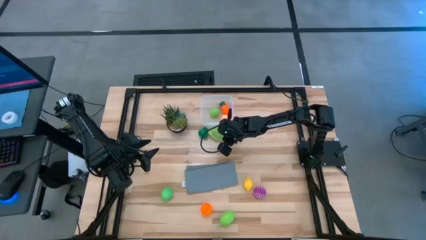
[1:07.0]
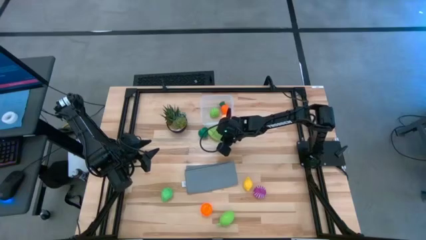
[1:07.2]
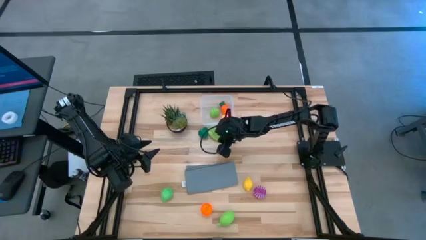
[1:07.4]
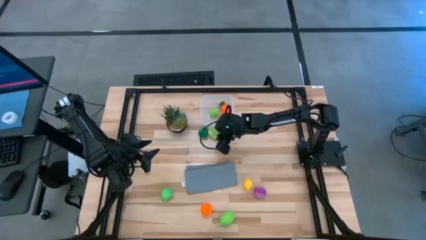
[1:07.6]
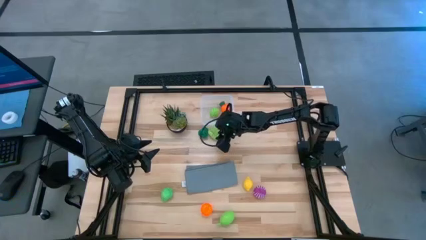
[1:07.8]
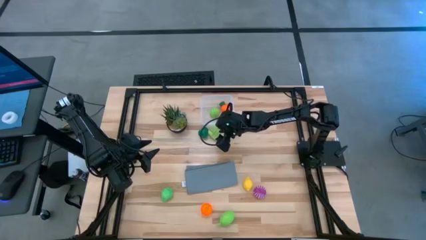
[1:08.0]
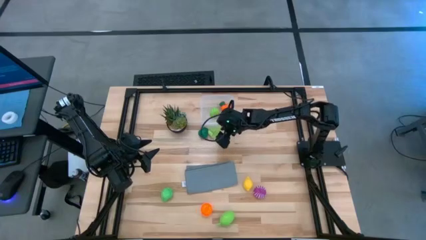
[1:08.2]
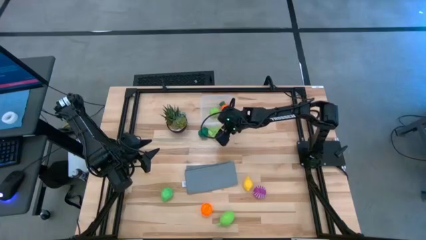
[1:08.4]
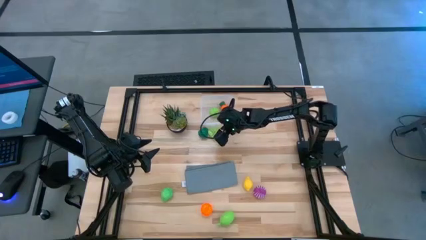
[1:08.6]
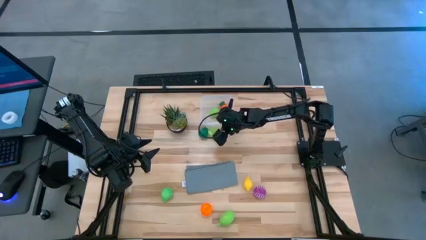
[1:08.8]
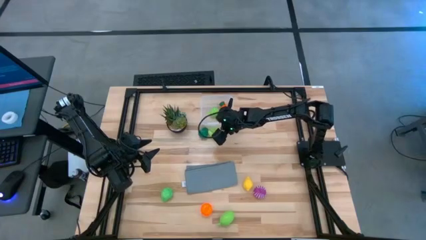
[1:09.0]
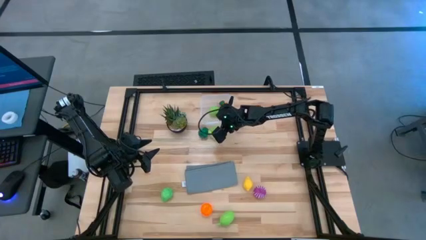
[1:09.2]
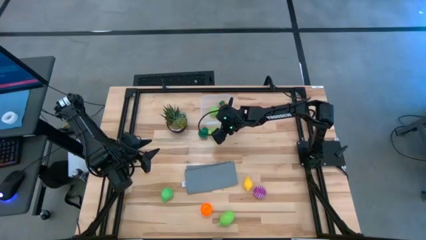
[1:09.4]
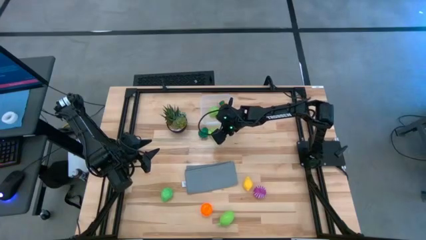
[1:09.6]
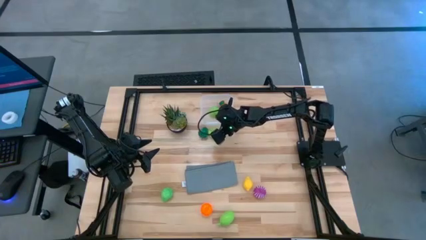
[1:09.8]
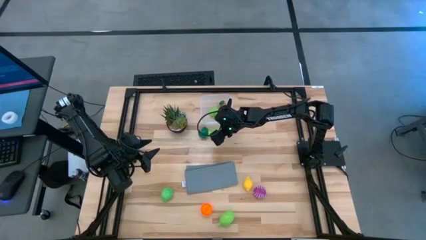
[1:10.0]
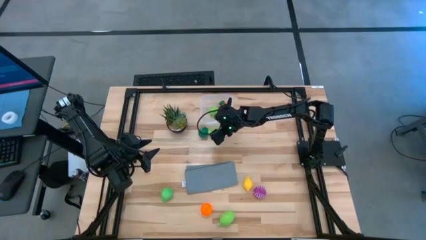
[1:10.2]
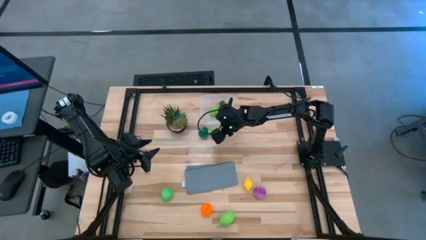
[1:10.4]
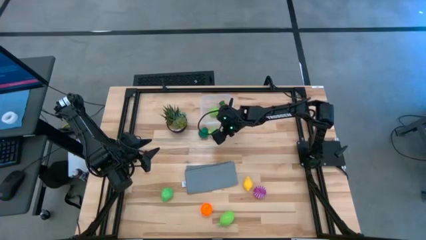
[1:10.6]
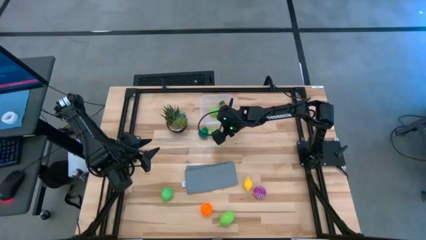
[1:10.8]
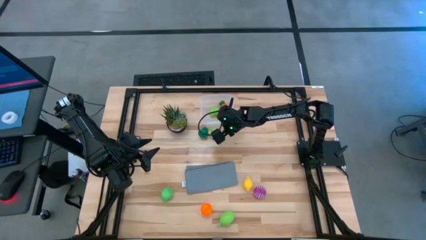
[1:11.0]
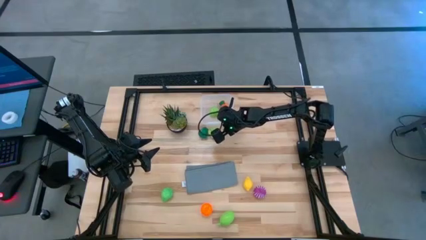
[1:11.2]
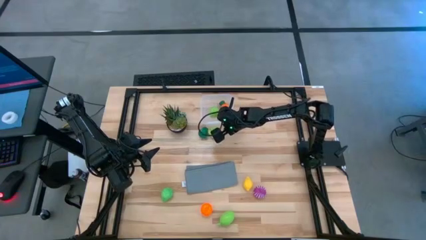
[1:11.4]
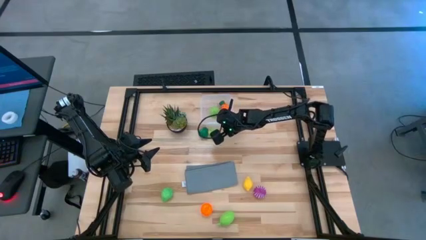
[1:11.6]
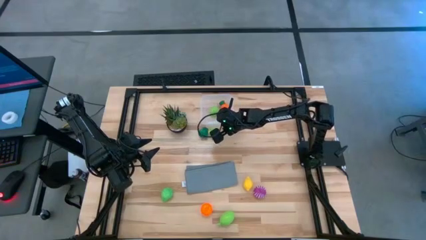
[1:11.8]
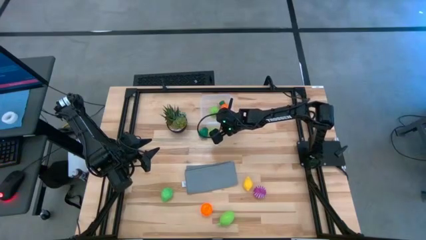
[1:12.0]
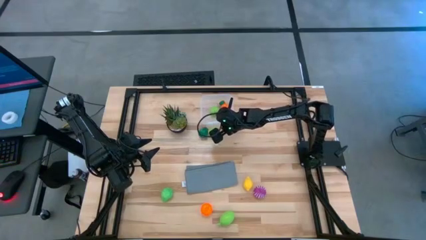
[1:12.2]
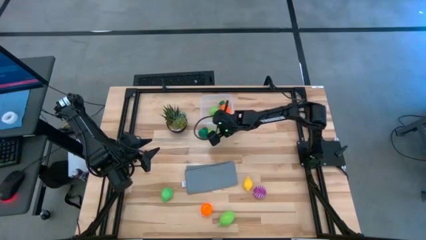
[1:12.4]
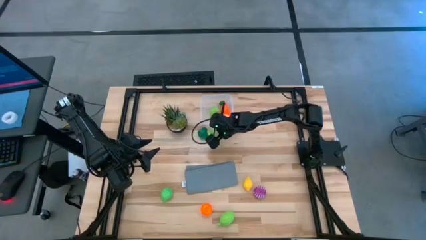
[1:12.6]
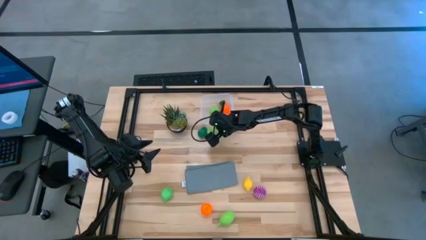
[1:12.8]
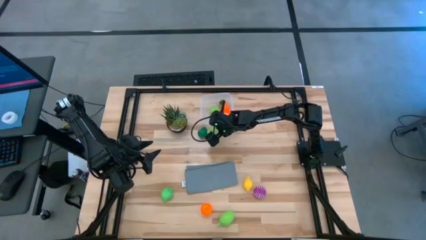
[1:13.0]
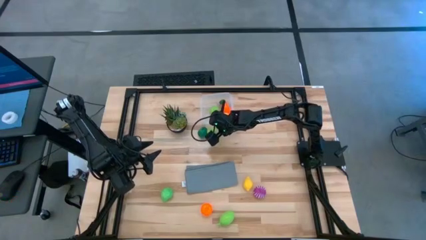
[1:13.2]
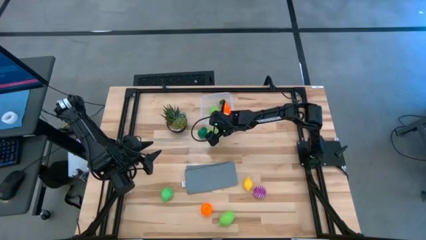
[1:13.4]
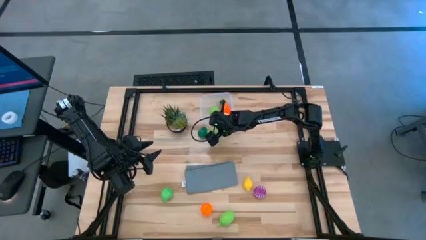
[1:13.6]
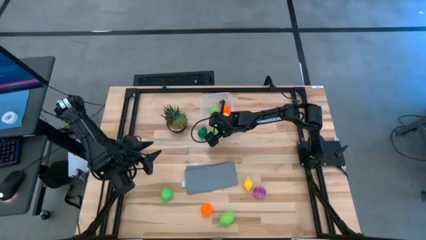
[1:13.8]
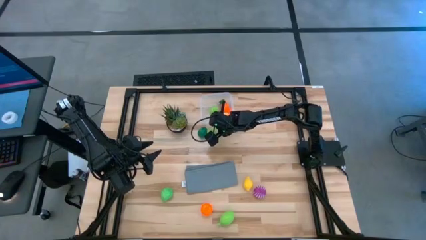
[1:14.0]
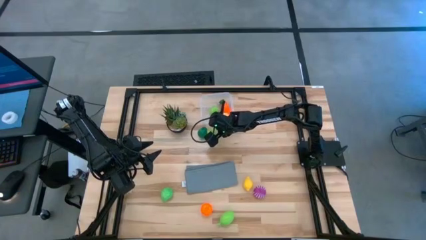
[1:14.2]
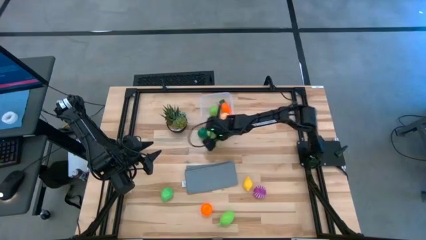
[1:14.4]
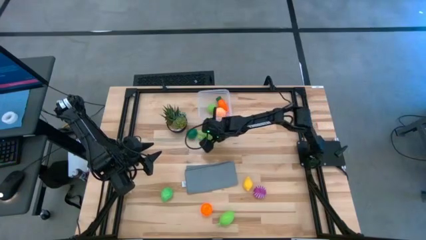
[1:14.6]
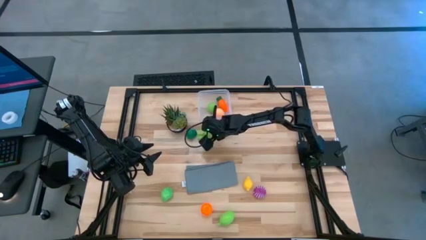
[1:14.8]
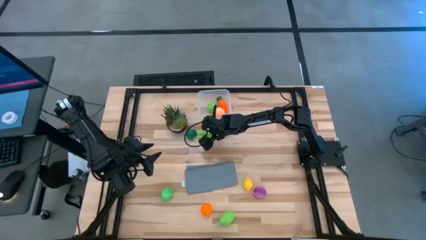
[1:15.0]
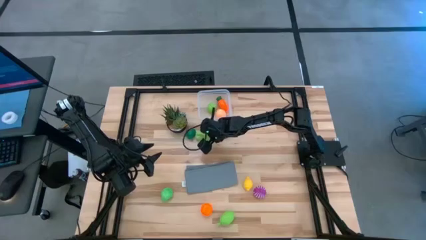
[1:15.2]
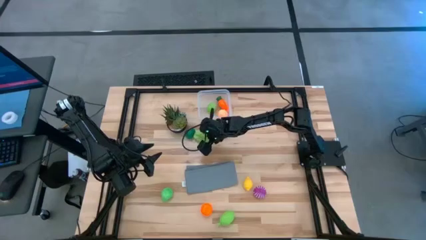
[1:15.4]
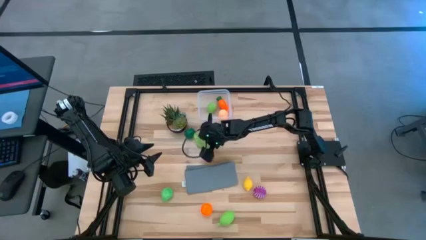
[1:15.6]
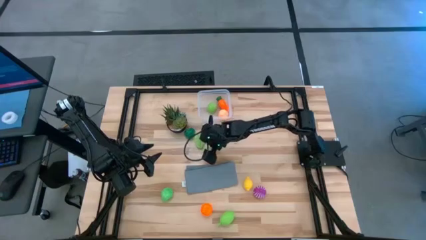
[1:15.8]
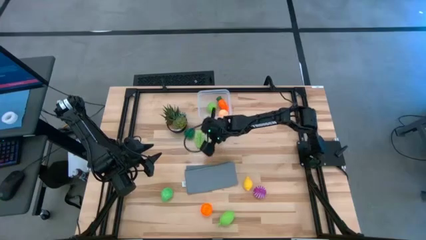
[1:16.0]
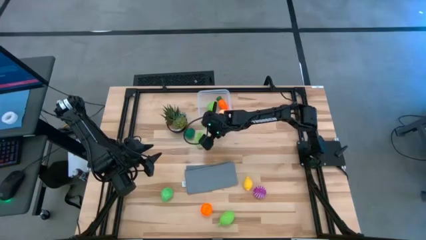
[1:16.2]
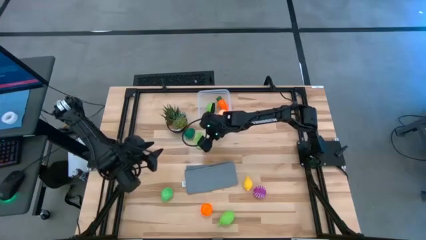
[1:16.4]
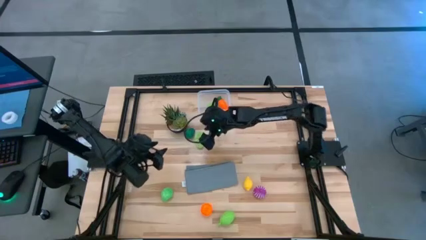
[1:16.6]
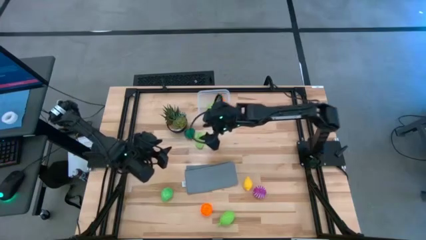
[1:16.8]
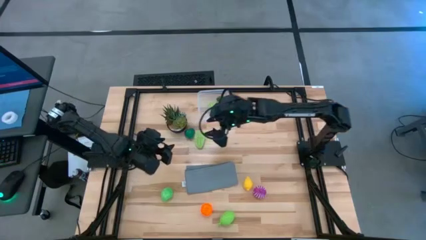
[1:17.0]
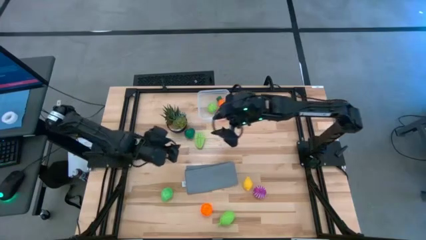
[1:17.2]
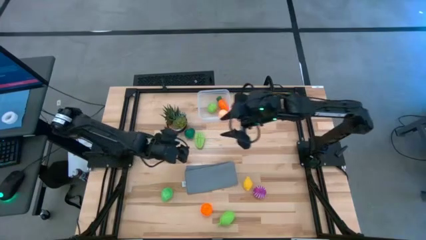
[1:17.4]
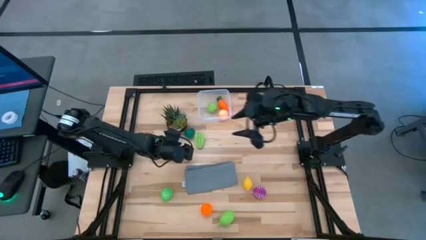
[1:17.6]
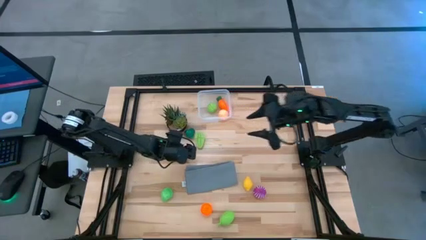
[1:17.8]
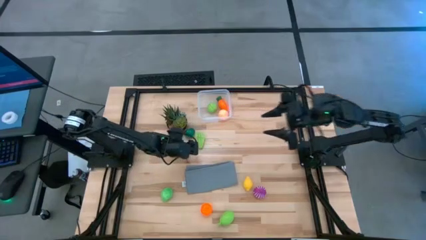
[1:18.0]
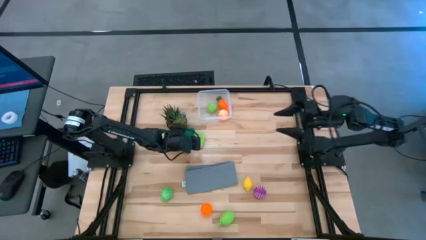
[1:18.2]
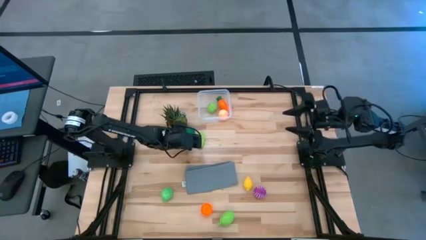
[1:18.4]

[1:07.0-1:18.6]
Task: Pick and placing Produce into tupperware
Put the starfruit into the bin

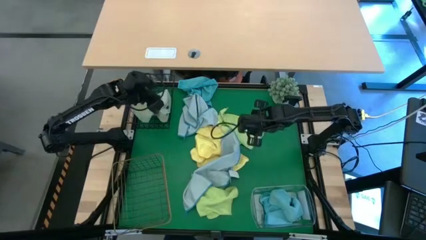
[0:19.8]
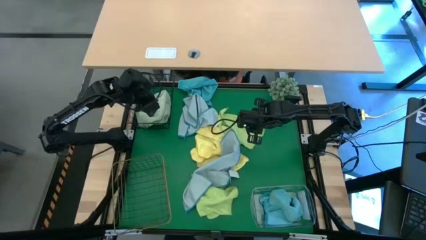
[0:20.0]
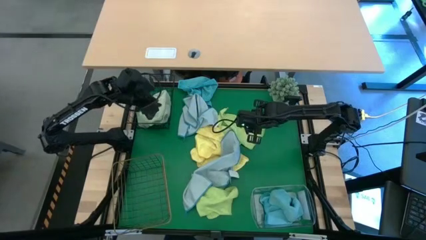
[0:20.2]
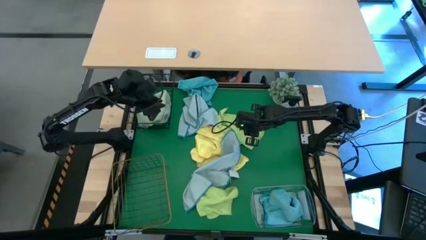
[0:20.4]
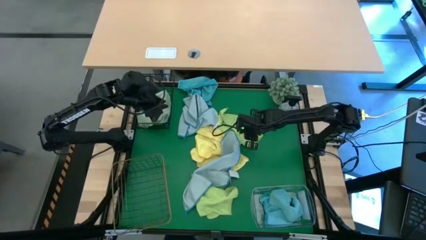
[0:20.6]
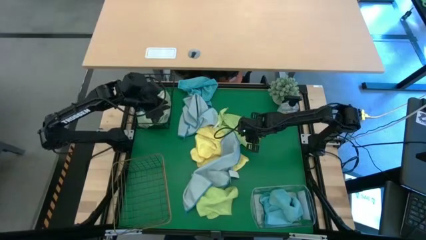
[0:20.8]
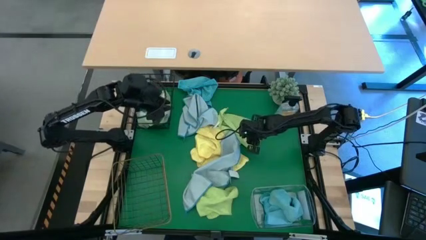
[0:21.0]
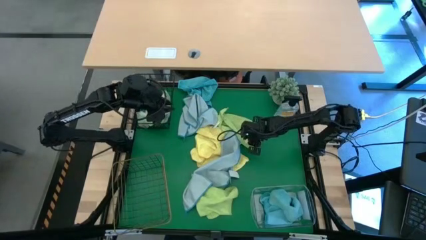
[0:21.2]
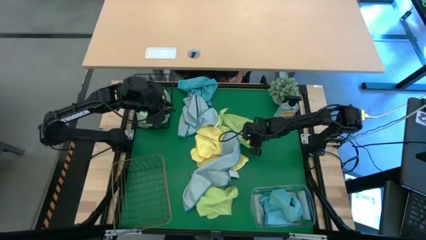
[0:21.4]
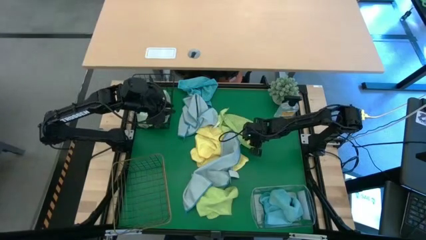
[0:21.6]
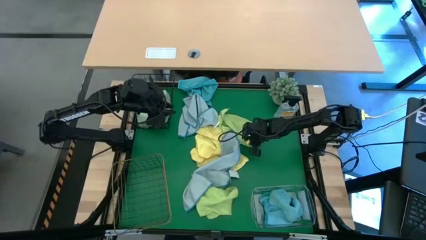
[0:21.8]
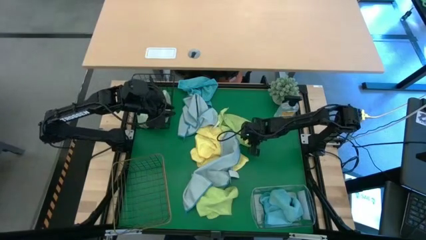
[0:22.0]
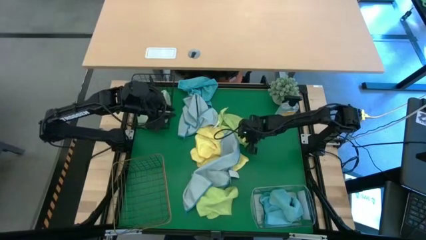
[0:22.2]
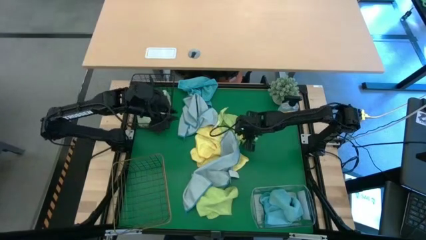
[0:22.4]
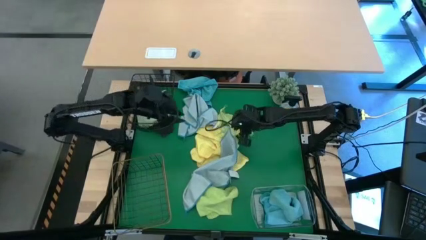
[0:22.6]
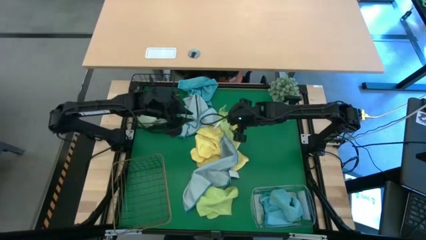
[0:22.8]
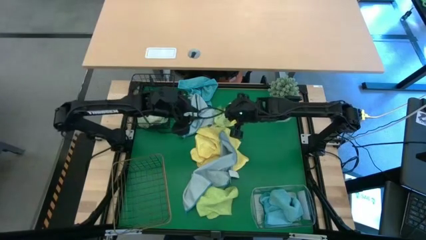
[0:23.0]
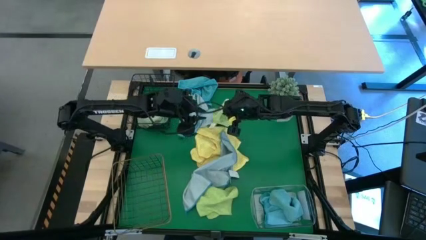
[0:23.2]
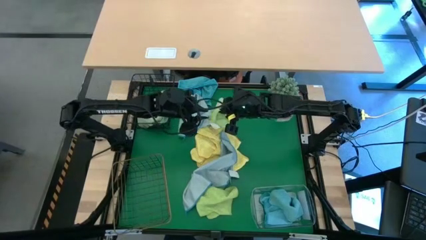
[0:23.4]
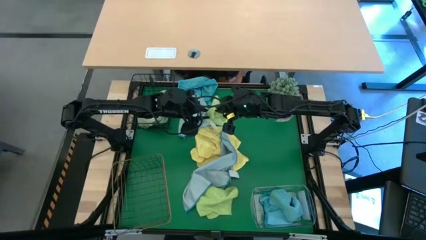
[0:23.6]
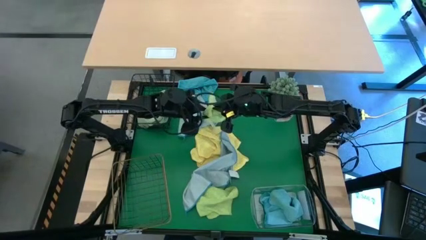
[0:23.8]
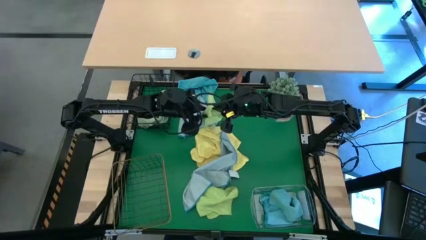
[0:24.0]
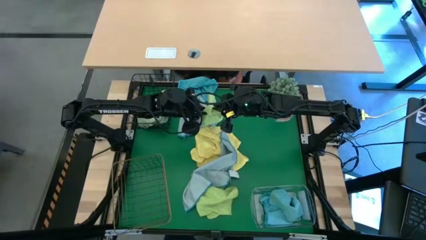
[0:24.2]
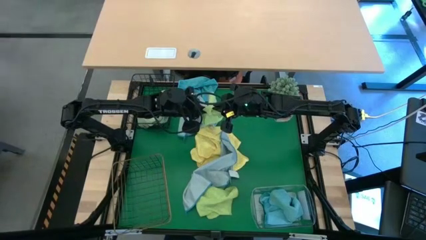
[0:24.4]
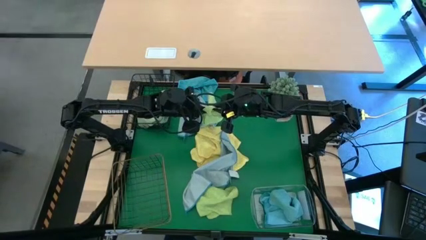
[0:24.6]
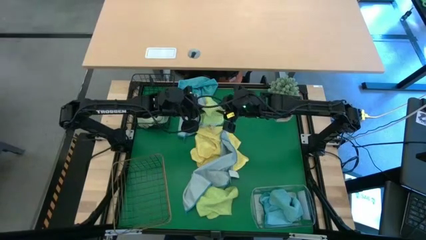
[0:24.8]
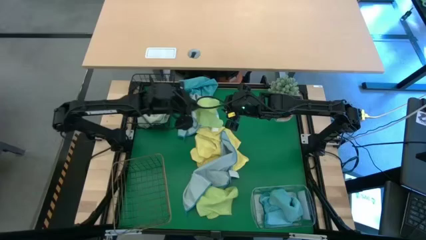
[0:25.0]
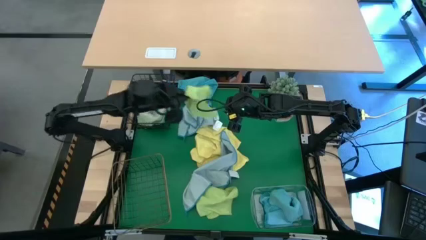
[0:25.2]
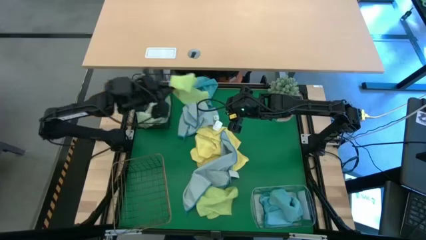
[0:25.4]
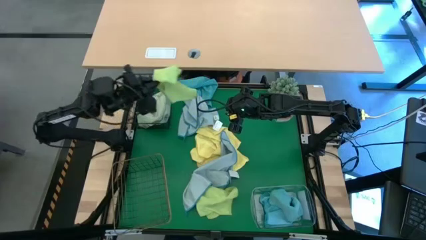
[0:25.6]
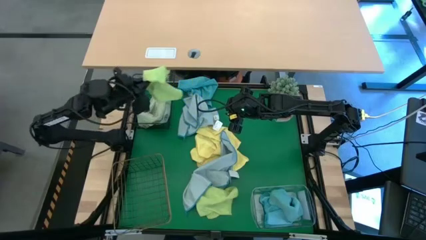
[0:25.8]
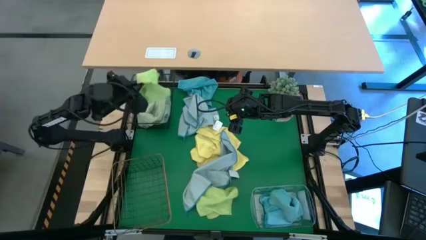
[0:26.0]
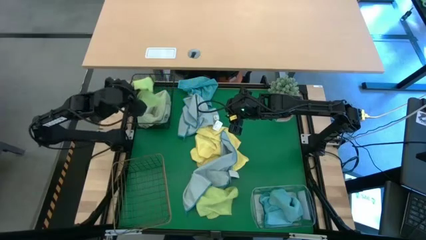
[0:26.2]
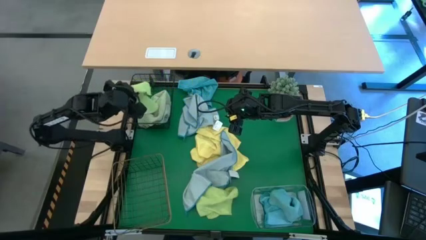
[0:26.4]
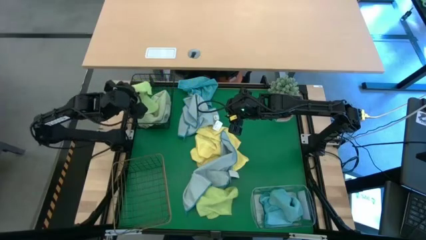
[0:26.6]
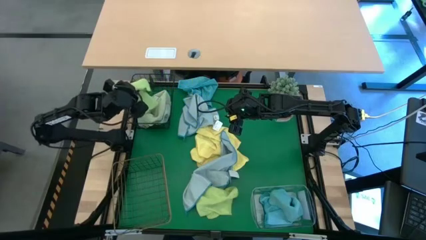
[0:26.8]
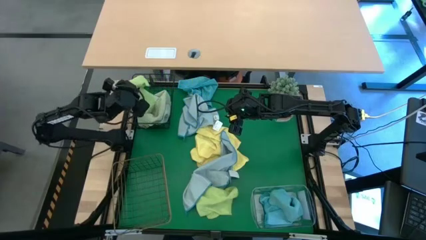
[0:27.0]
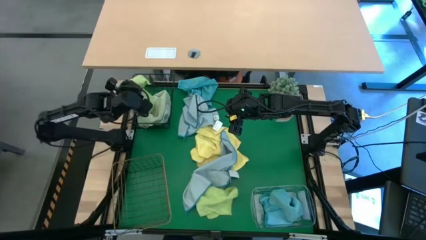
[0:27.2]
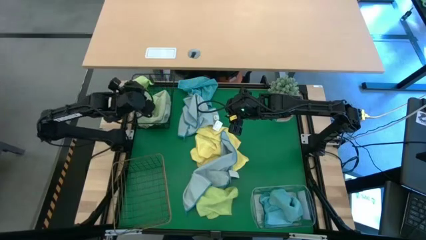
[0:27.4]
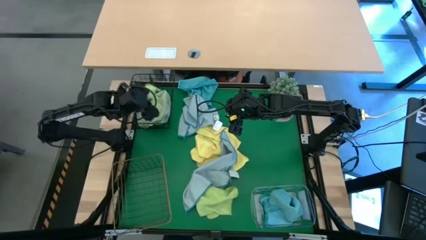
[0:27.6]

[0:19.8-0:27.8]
Task: Sort microfiber towel by color & place in baskets
Put the top green microfiber cloth into the black wire basket
